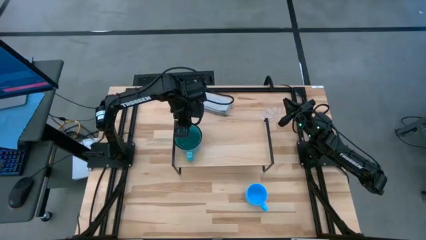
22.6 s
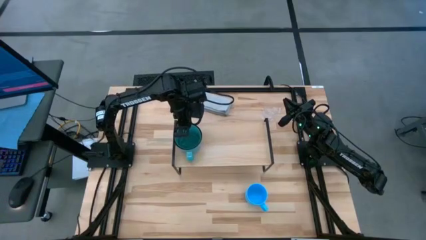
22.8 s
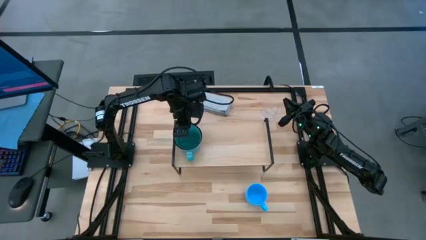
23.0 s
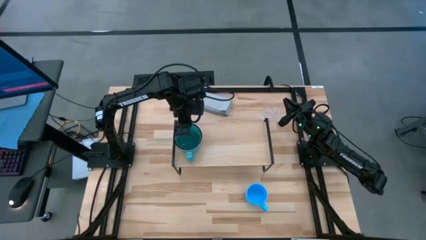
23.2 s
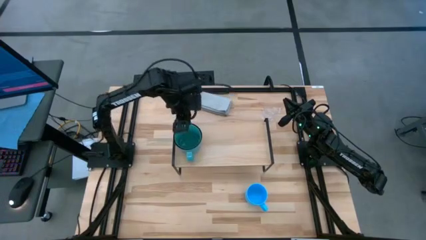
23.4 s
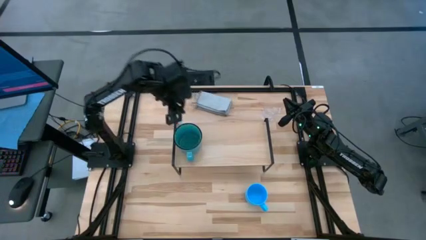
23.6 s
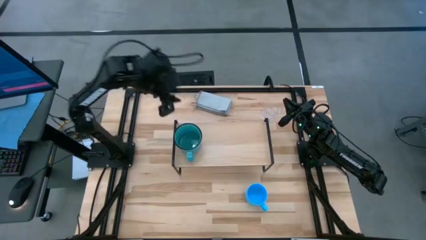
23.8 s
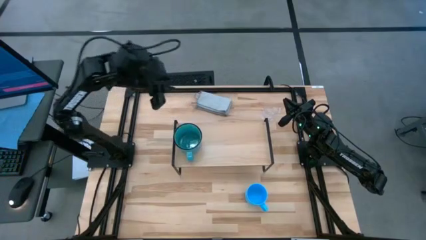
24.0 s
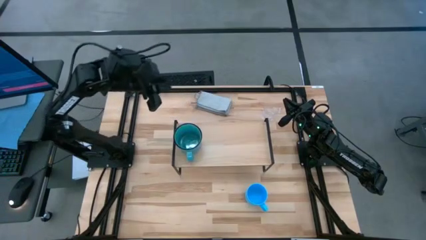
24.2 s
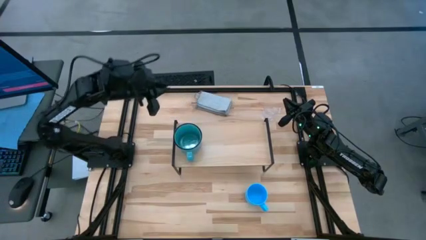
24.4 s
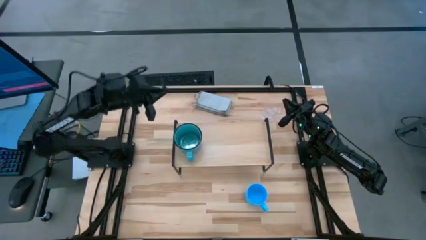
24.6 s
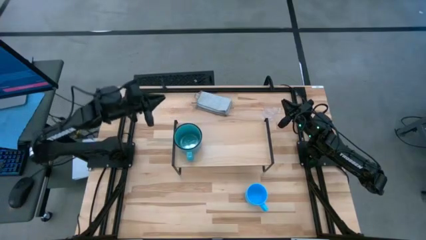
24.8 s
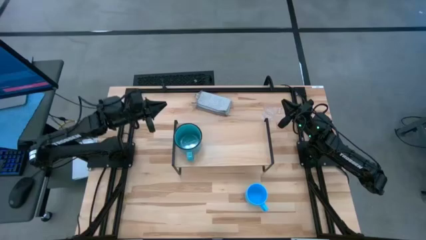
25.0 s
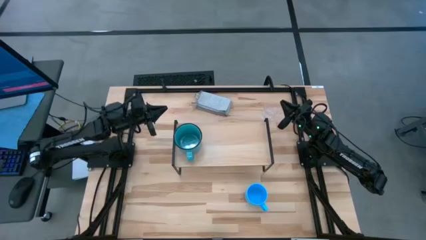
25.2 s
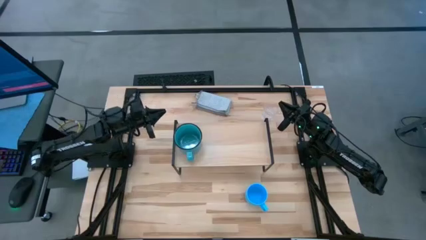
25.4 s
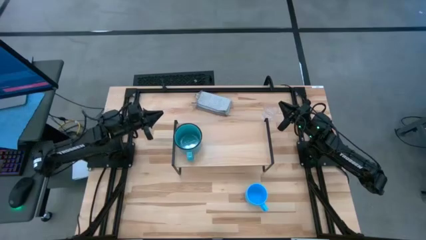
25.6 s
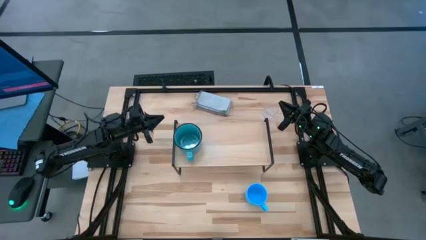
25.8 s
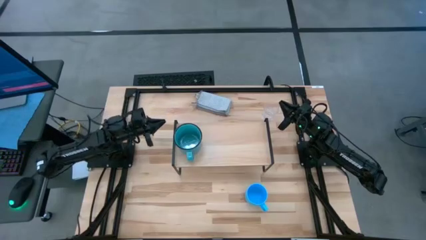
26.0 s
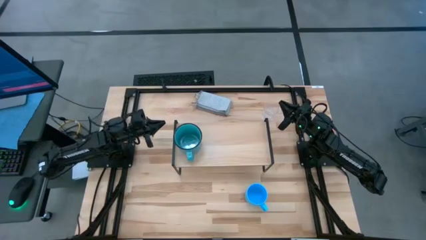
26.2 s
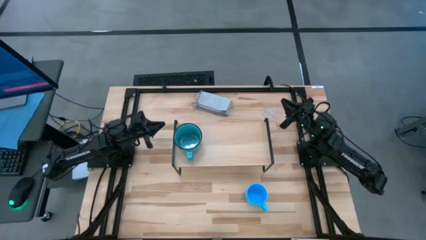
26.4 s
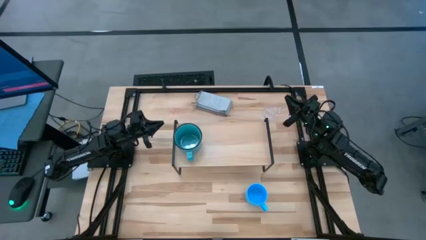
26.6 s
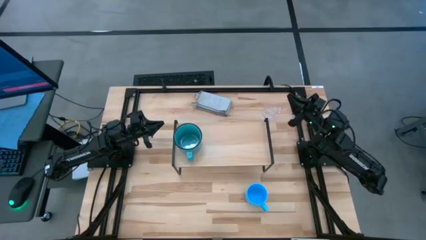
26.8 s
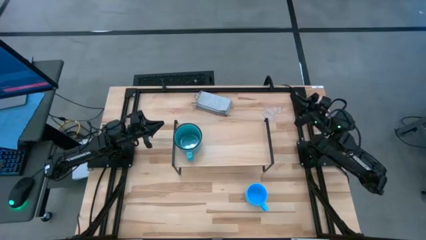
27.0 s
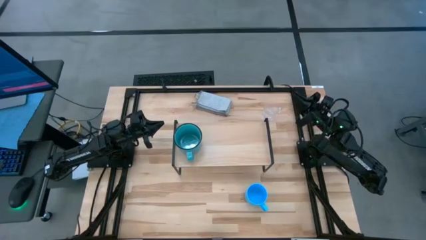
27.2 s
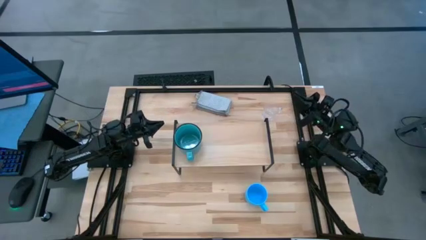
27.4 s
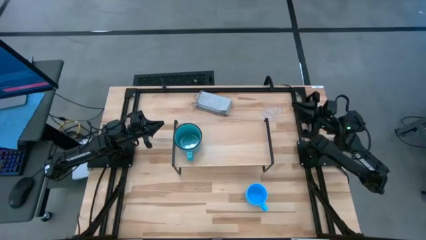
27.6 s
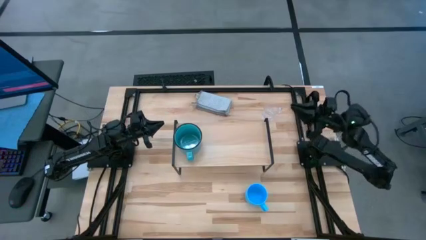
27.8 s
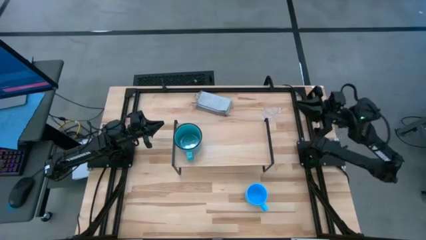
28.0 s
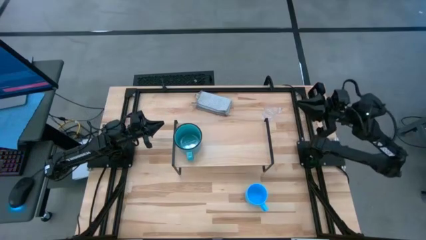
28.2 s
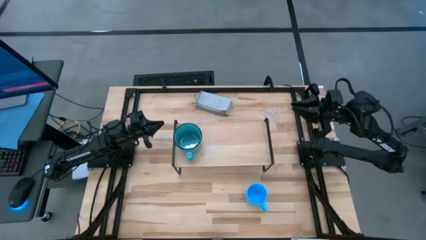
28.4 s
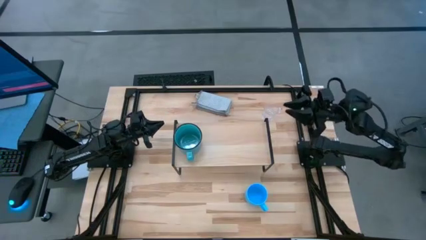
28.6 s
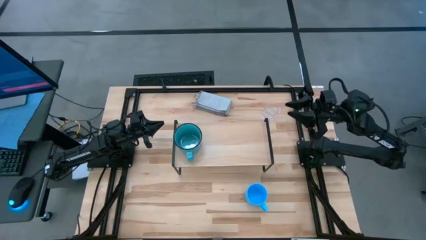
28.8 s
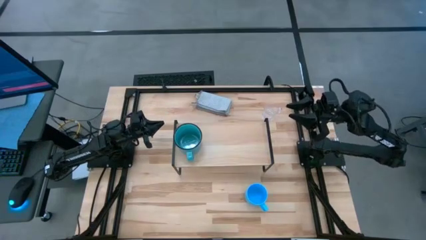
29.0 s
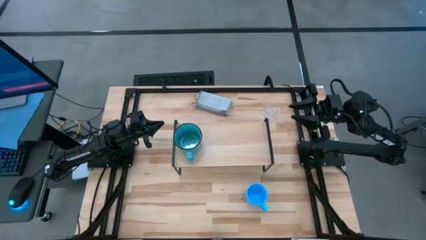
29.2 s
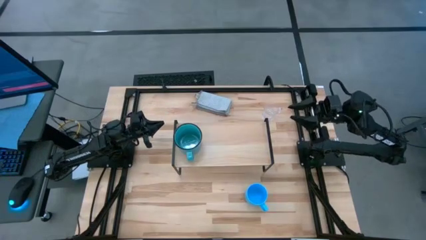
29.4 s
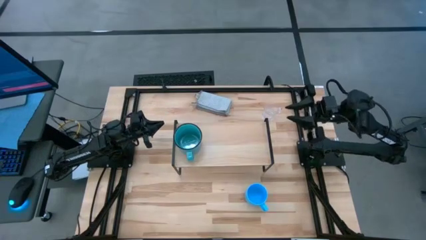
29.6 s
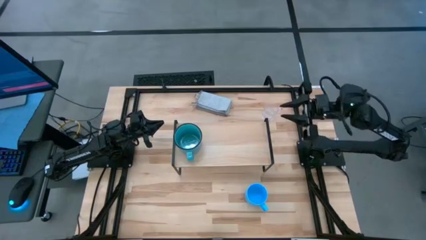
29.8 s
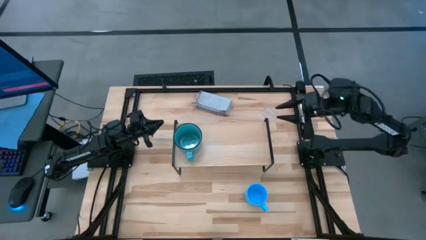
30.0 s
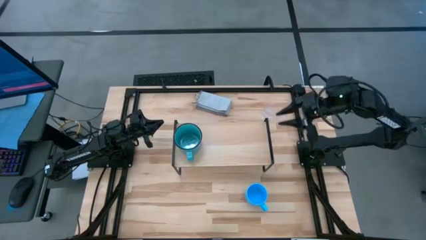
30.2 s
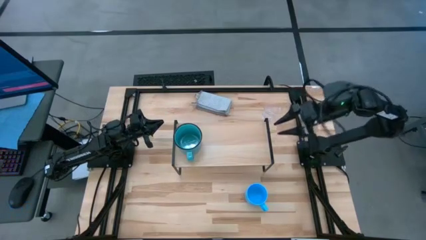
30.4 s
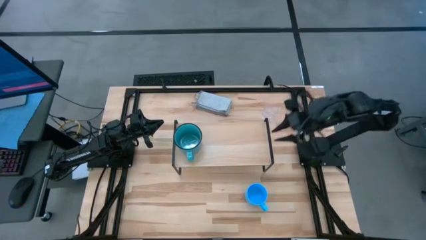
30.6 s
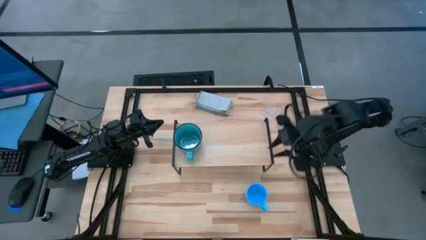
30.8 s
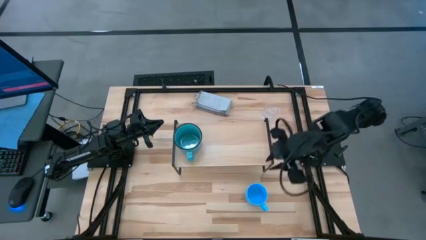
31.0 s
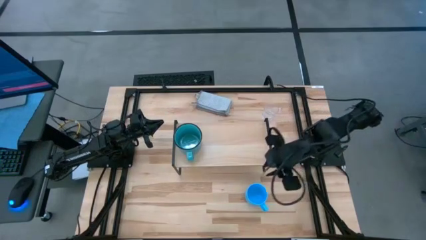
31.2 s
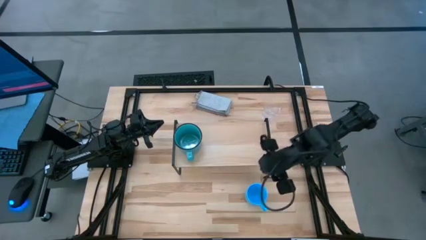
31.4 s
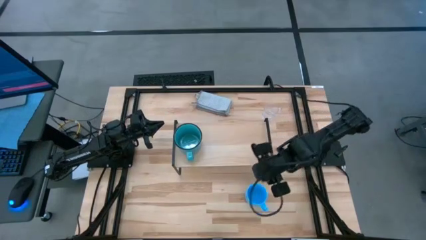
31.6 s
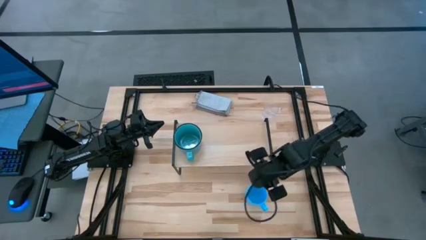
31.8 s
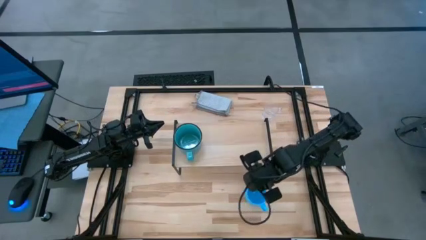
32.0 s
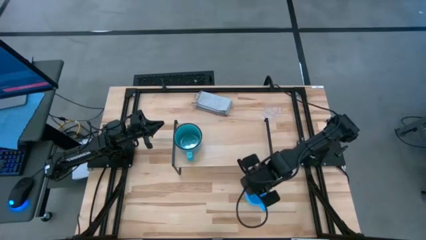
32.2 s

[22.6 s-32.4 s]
Task: Stack small to large cups/mugs on shelf
Put the light blue mug on the shelf

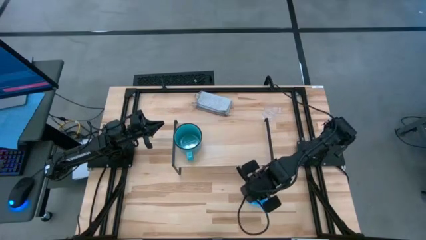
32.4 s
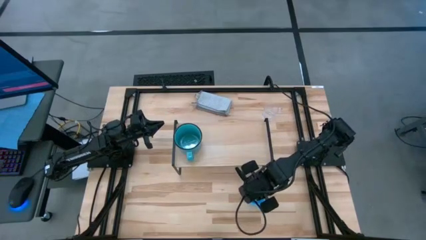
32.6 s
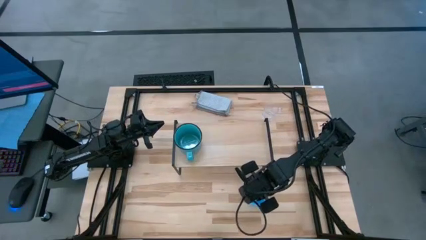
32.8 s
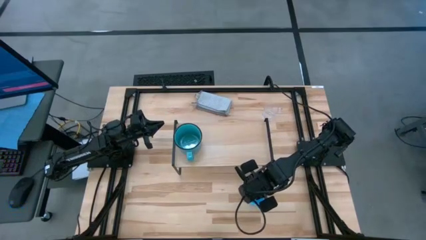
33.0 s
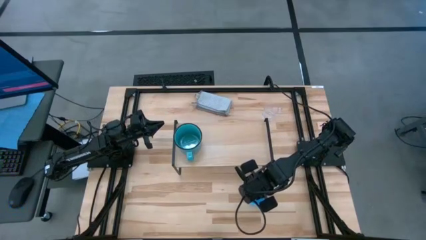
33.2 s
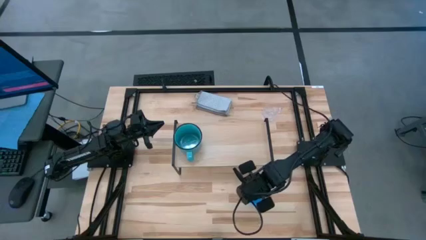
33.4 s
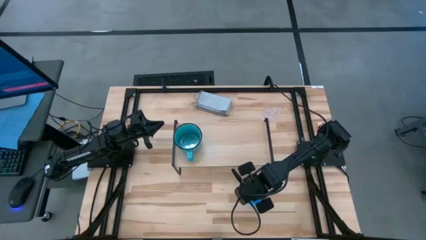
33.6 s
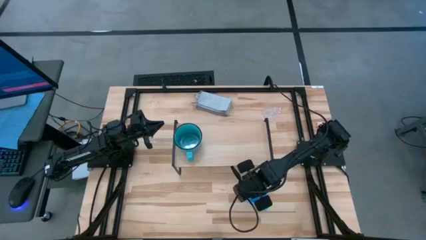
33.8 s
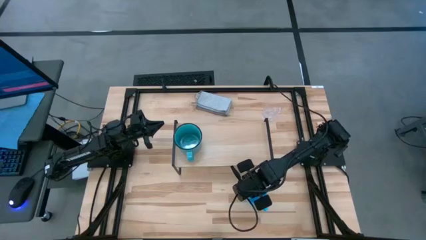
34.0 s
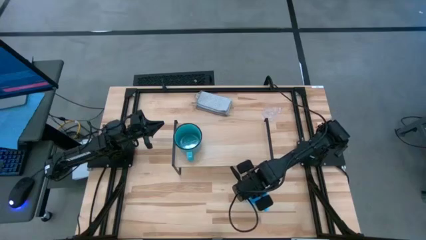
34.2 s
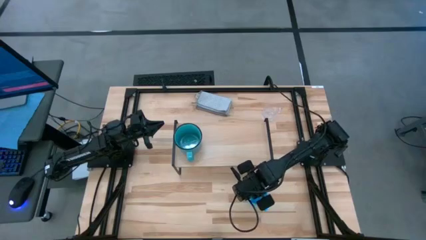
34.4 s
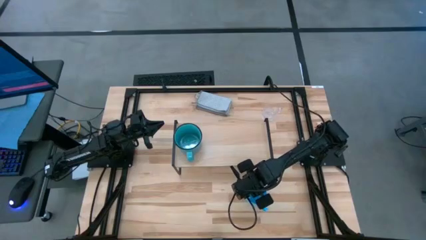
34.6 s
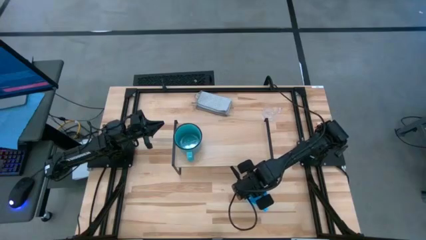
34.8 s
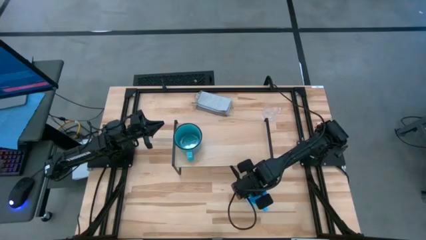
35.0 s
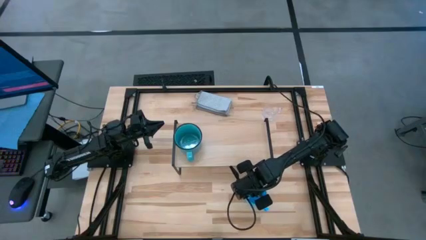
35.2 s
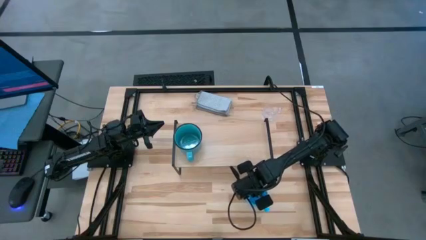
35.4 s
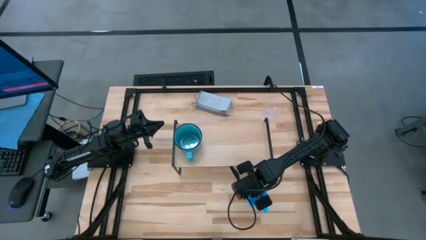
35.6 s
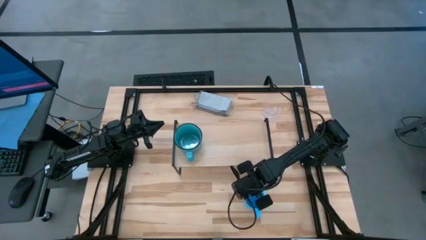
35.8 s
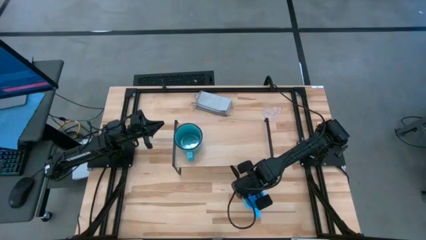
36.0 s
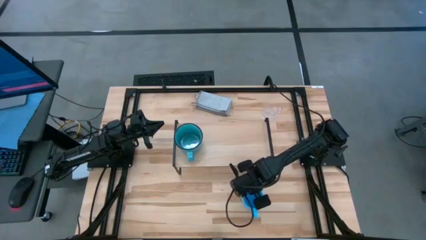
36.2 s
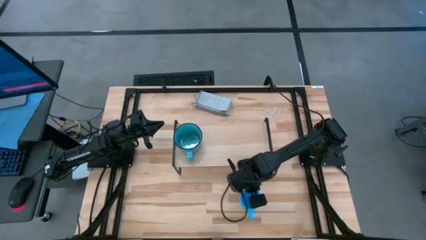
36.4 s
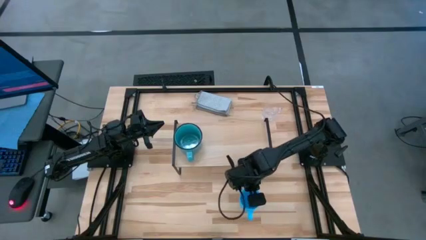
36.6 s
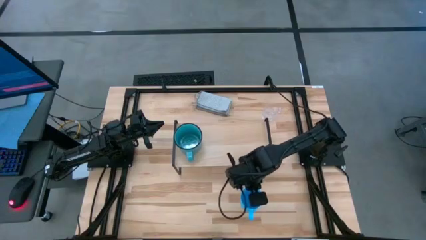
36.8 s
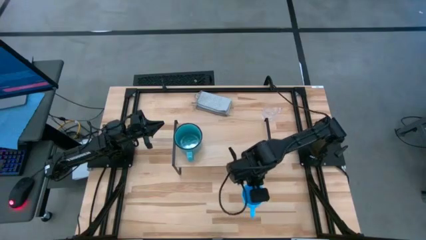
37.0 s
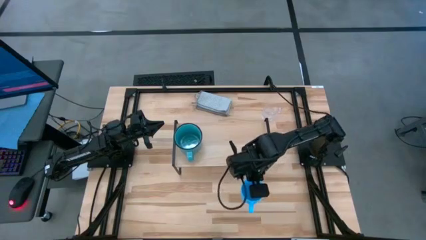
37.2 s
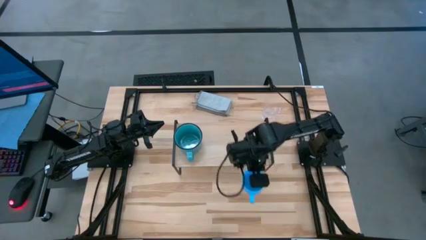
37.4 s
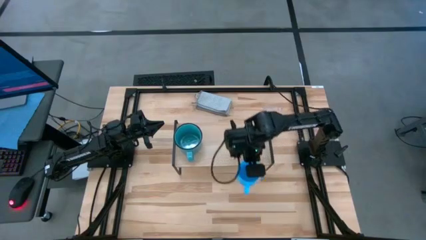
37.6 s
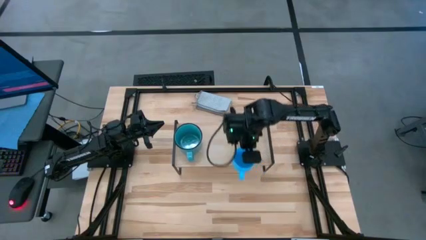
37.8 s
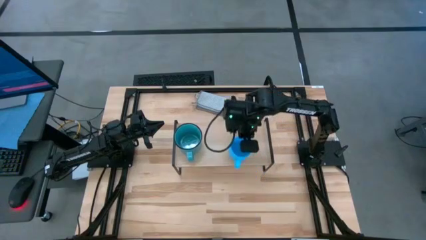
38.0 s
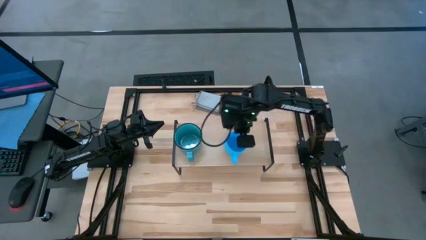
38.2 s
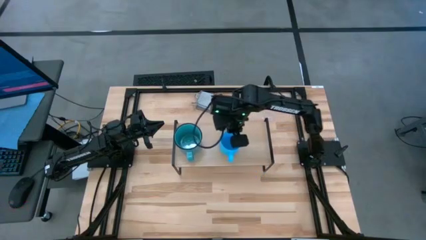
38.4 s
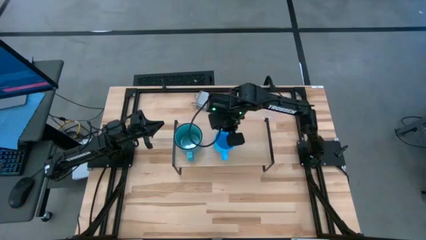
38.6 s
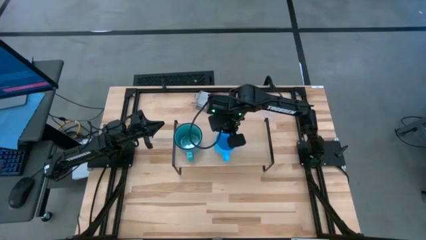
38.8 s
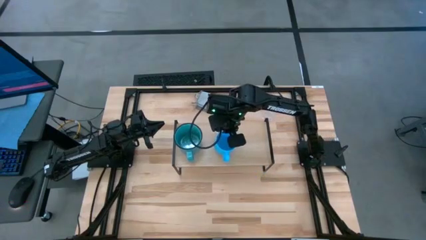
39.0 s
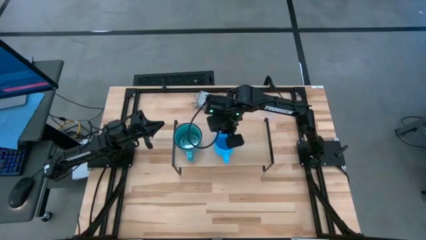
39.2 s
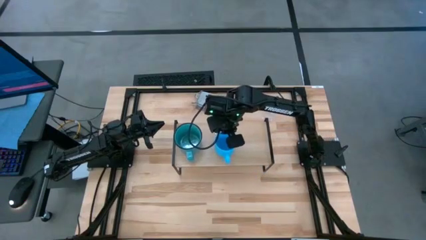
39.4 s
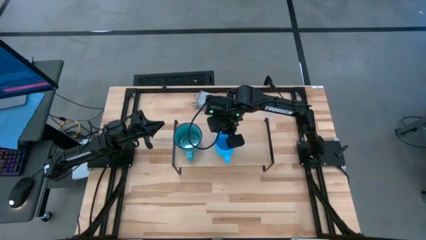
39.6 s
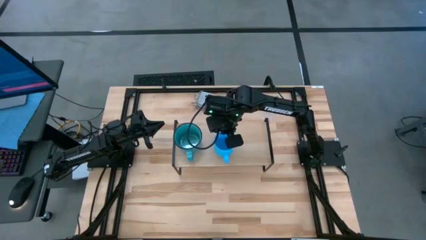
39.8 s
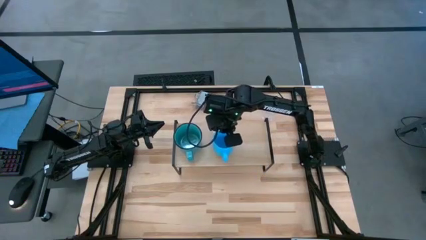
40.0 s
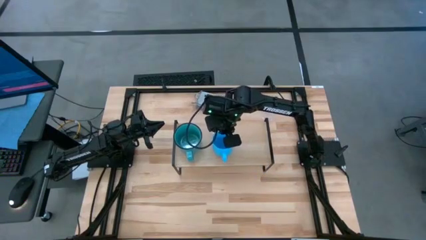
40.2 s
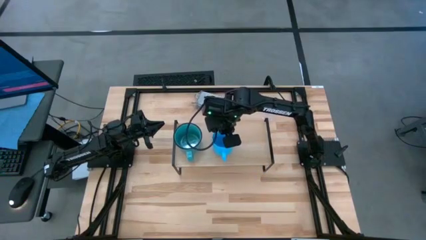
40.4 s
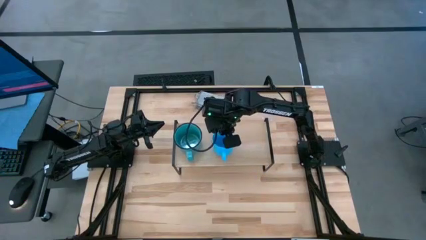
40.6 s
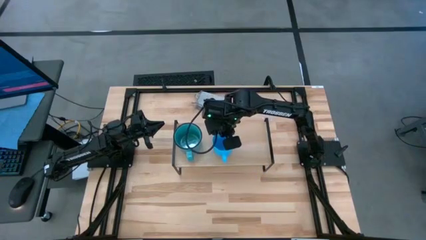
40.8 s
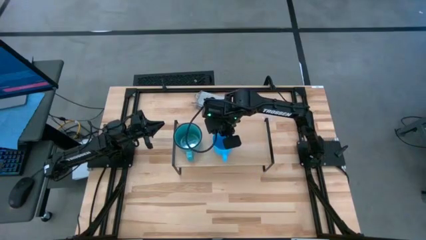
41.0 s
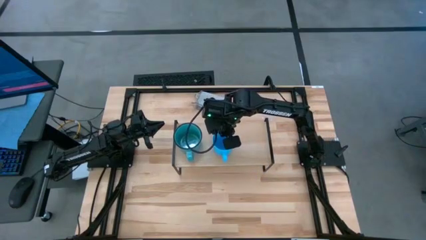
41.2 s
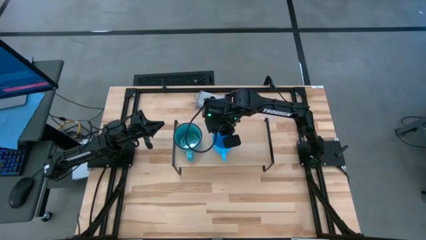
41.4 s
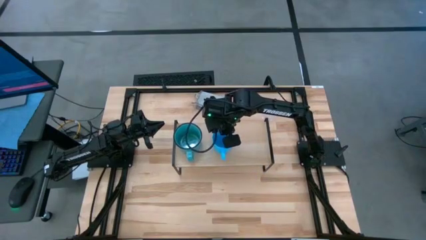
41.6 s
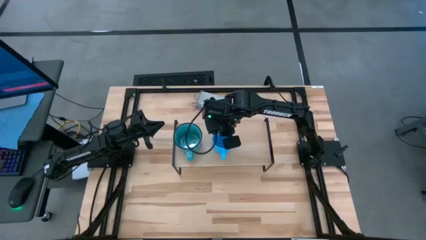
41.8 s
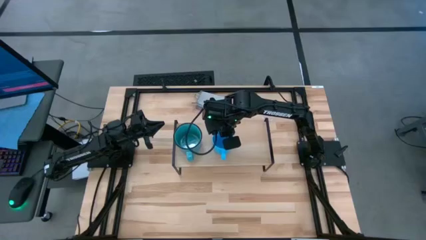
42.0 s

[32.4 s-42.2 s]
Put the light blue mug on the shelf
